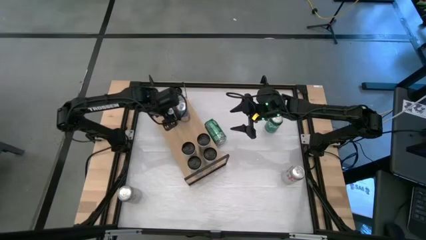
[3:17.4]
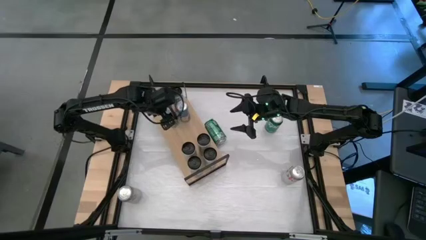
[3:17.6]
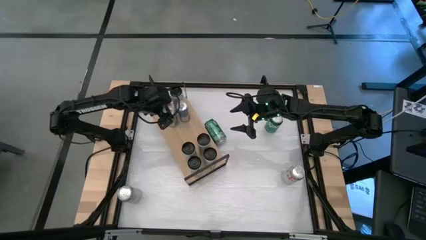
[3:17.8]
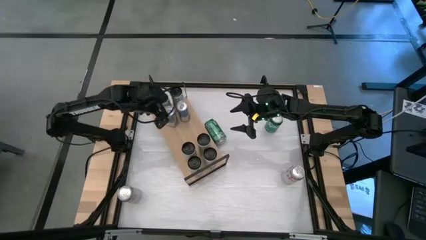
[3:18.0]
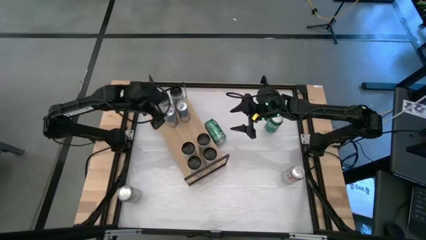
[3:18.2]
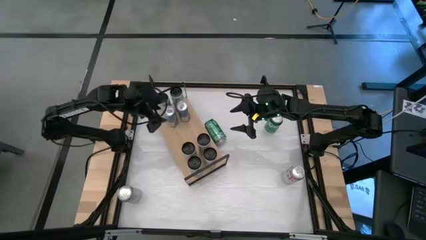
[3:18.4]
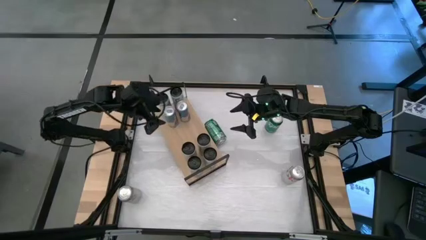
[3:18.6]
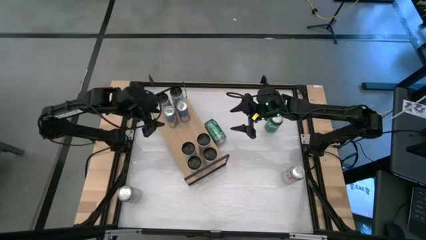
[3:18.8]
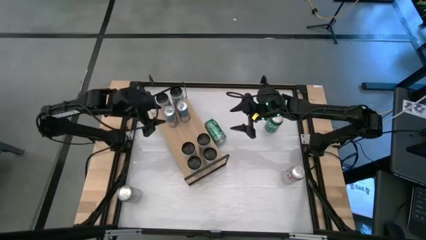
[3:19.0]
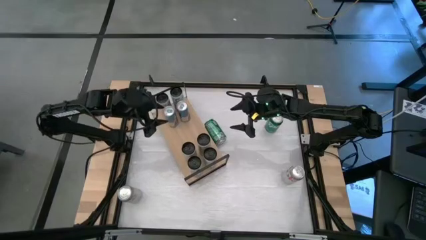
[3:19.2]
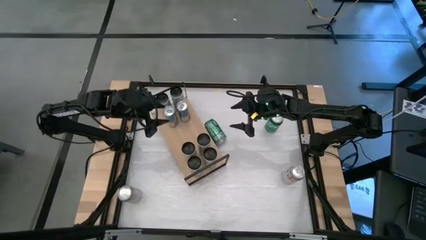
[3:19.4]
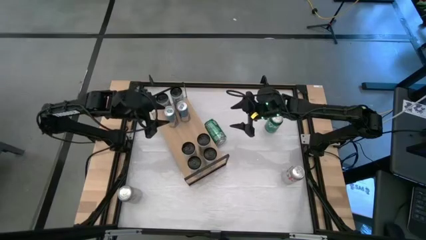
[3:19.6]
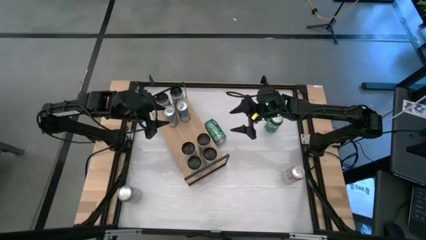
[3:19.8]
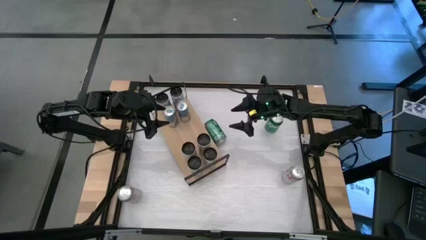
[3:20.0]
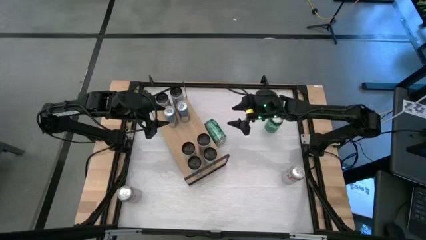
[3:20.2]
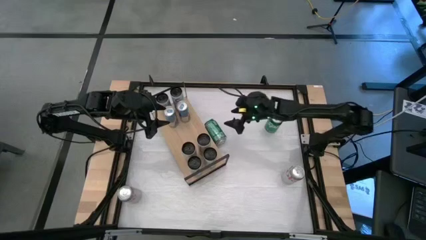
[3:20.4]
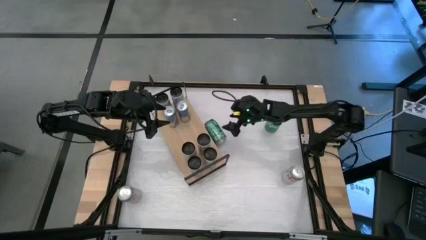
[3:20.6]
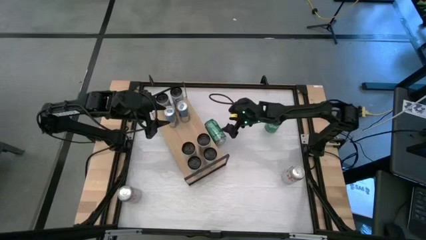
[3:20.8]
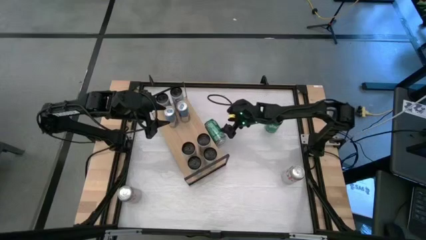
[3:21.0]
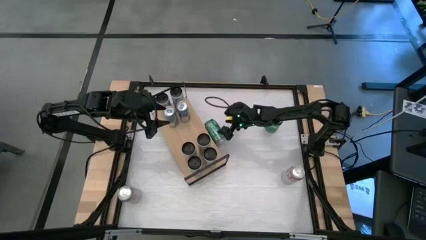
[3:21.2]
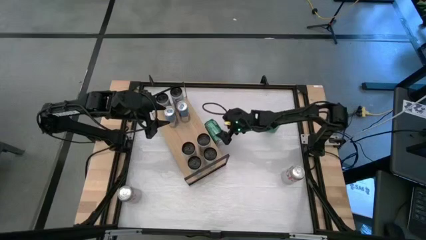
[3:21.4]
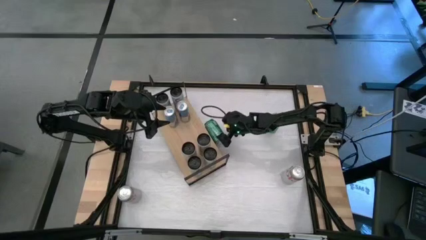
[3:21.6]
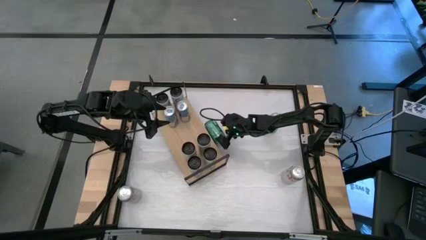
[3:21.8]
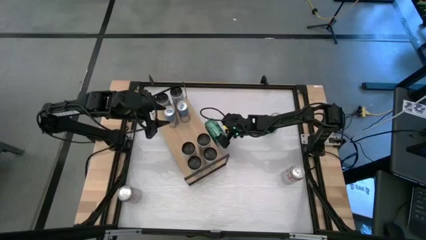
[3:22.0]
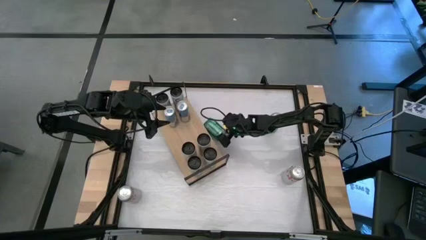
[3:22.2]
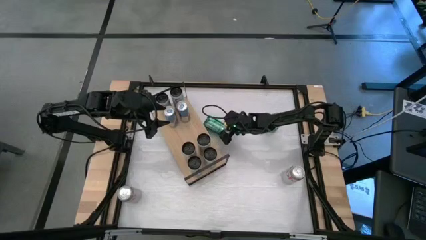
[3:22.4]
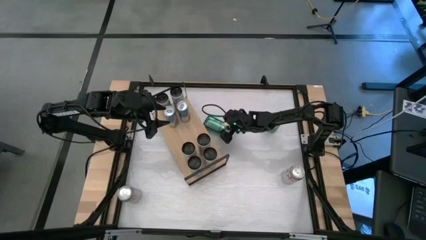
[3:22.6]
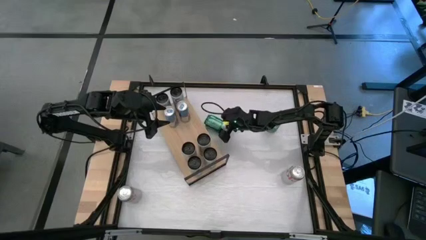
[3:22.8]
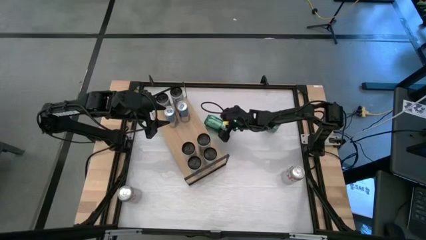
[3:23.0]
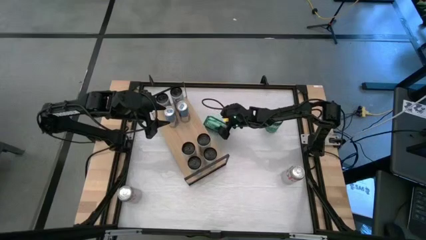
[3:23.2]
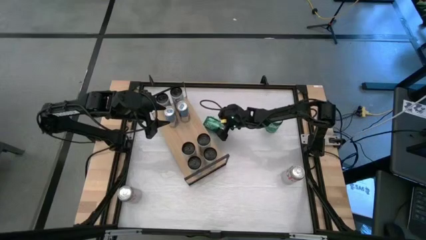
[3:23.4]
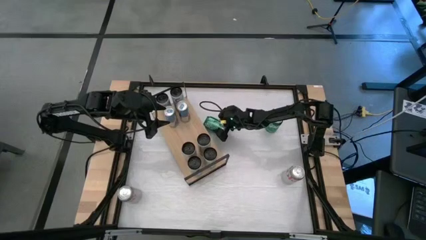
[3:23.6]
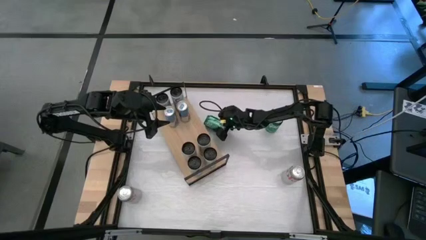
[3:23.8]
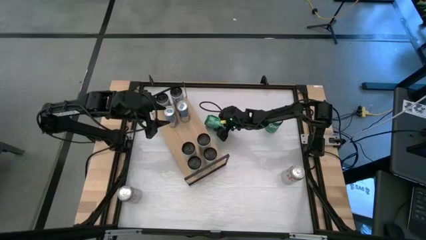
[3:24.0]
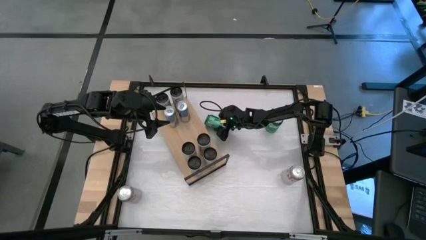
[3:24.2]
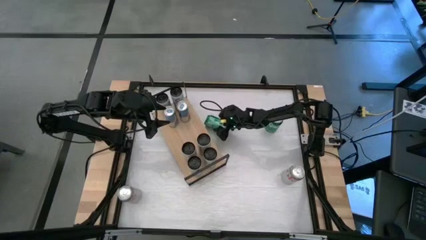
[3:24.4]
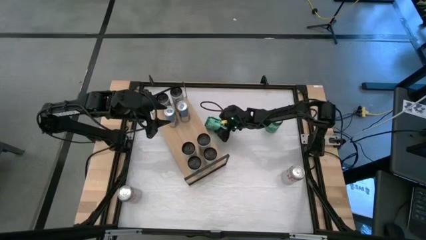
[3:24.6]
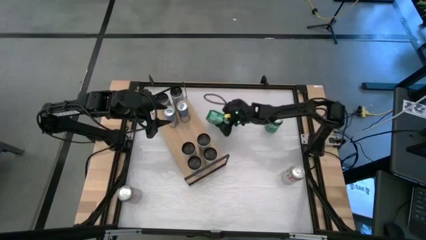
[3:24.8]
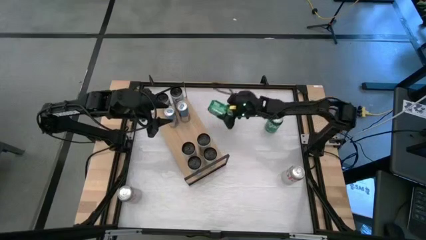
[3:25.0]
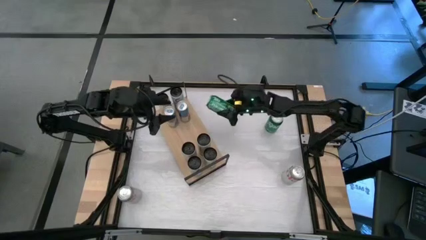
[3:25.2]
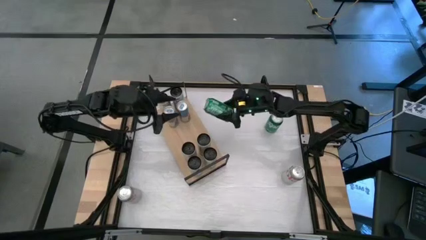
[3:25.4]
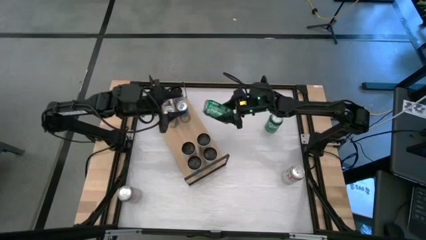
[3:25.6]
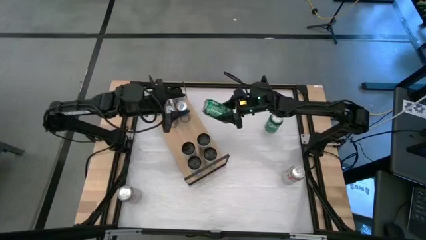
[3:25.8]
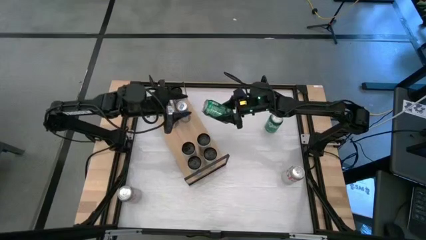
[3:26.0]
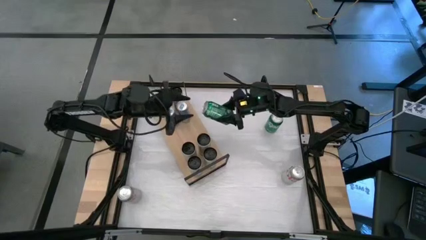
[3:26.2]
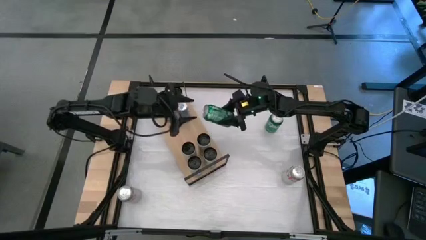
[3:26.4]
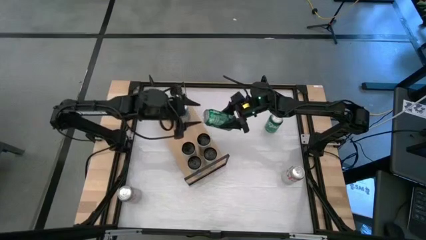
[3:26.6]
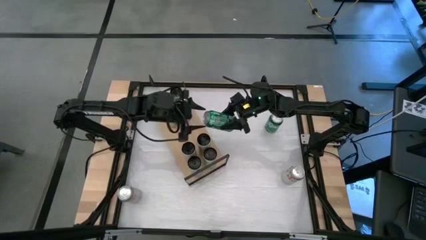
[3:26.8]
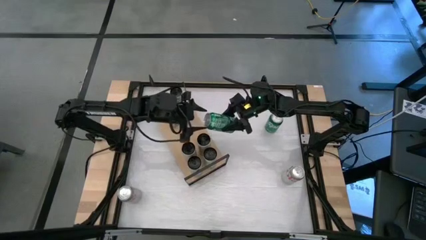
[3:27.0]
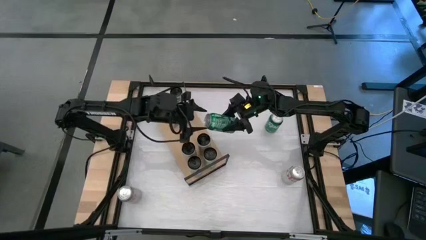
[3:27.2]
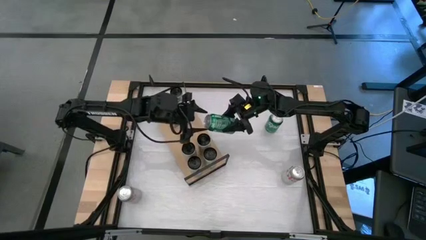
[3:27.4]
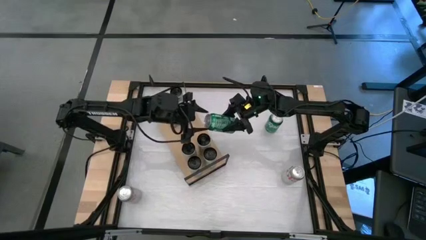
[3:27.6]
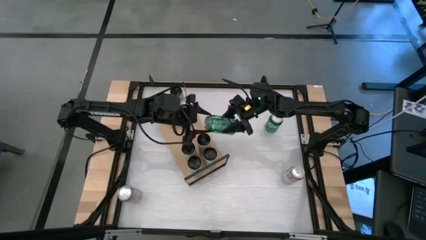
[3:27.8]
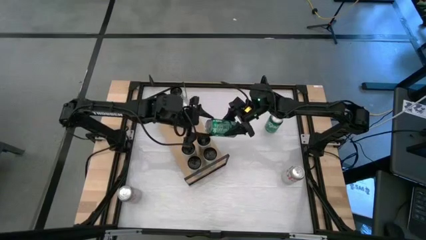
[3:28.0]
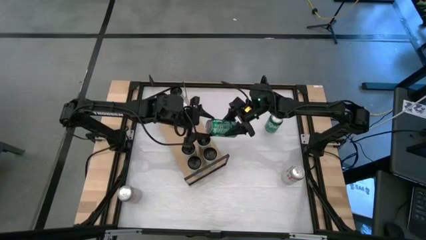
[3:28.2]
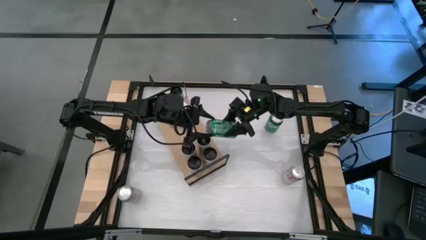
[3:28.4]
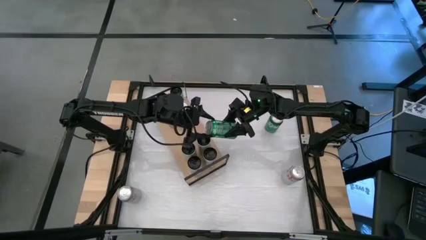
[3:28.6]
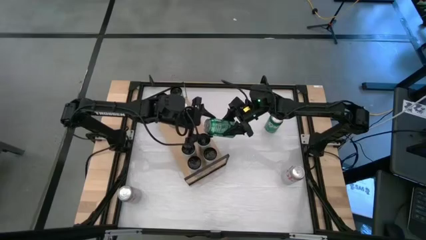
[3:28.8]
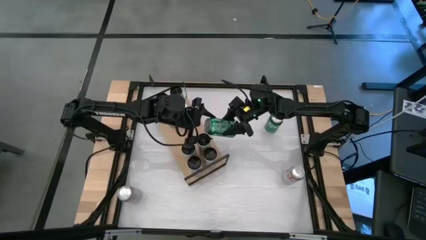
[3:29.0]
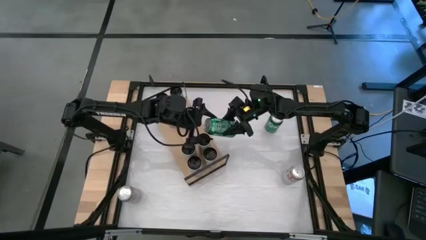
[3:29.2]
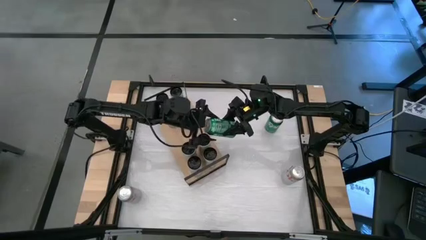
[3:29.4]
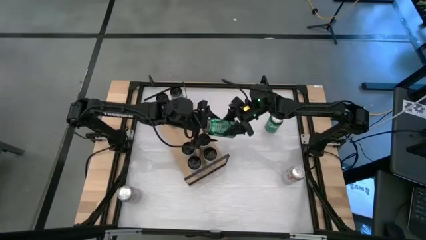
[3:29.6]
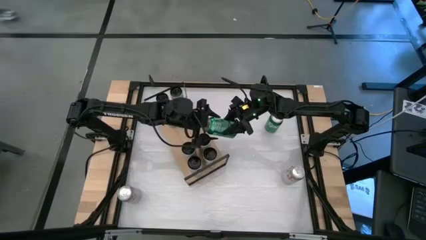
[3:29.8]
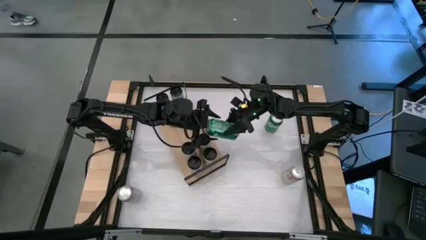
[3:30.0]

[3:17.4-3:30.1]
Task: Place canned beverage on shelf
Put the green soda can on the shelf
